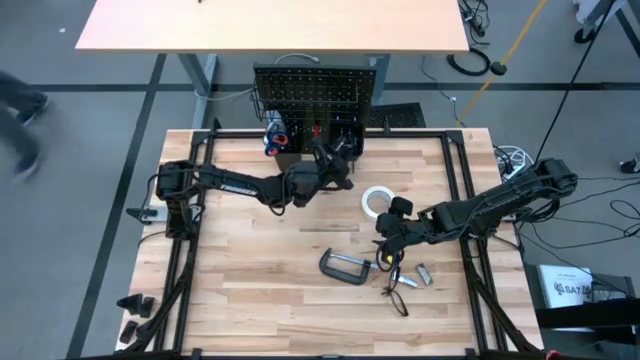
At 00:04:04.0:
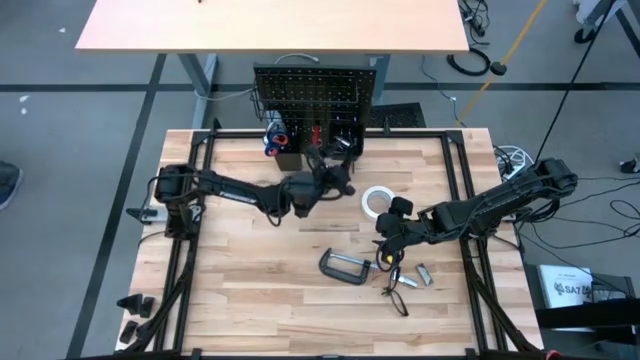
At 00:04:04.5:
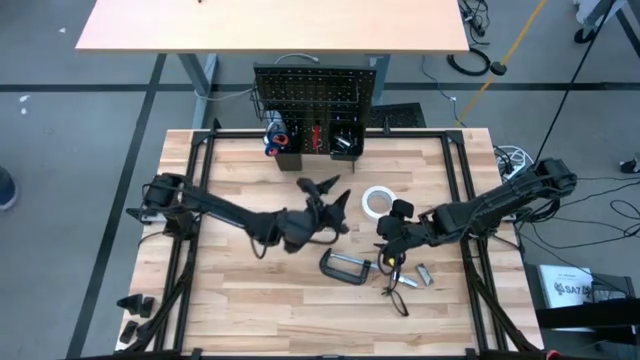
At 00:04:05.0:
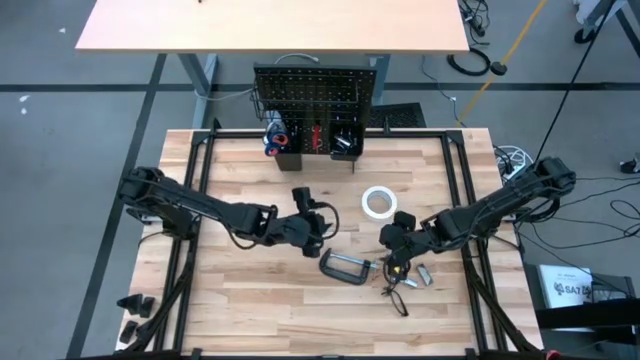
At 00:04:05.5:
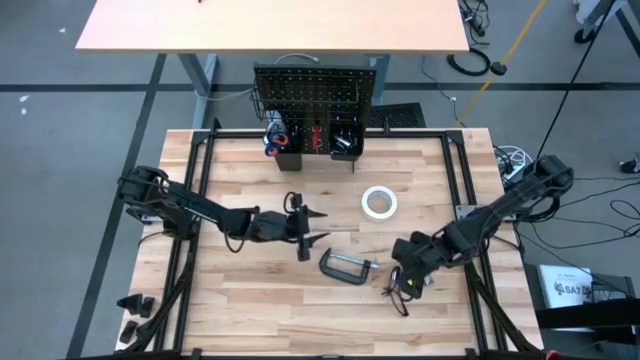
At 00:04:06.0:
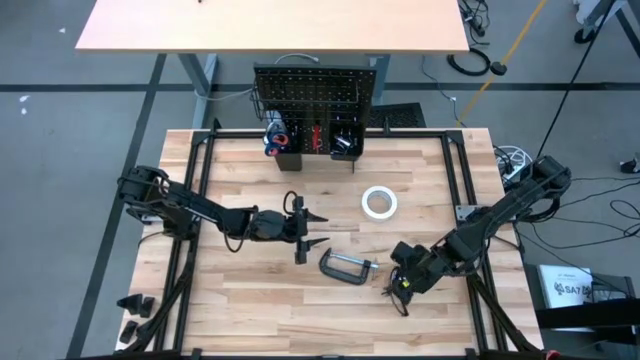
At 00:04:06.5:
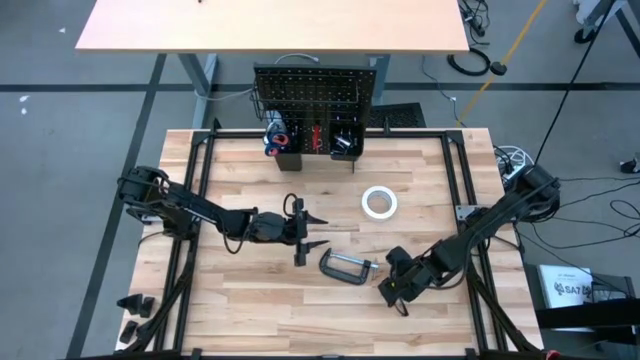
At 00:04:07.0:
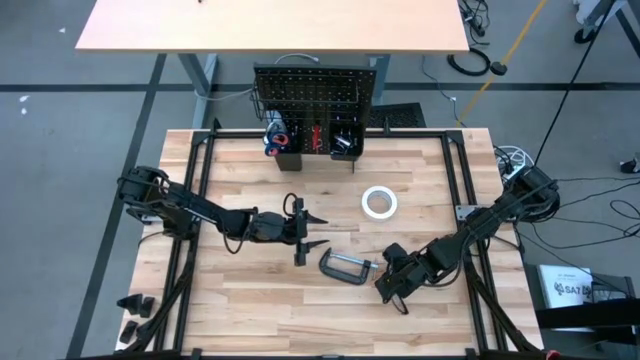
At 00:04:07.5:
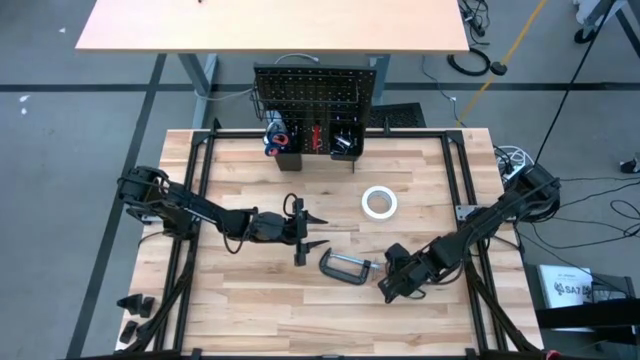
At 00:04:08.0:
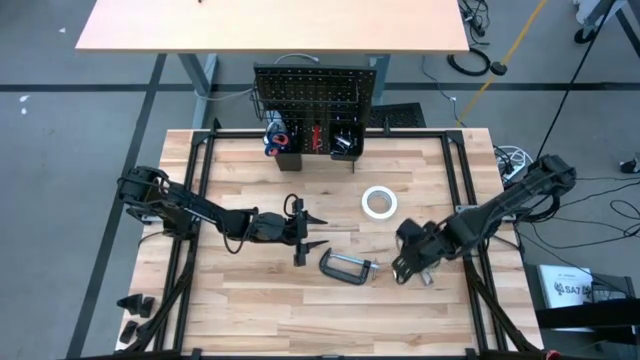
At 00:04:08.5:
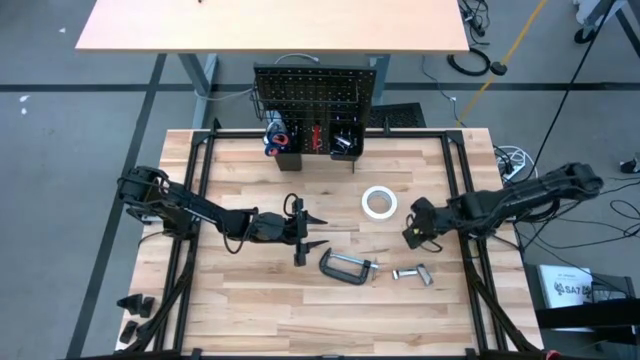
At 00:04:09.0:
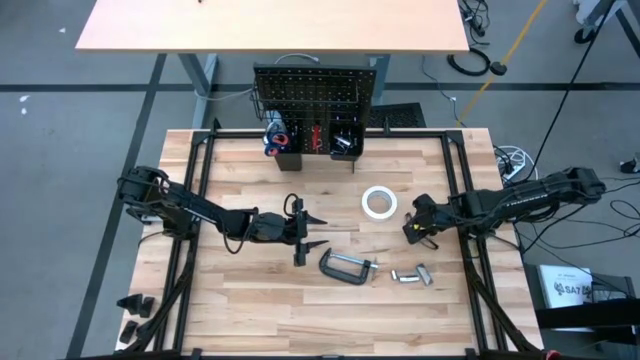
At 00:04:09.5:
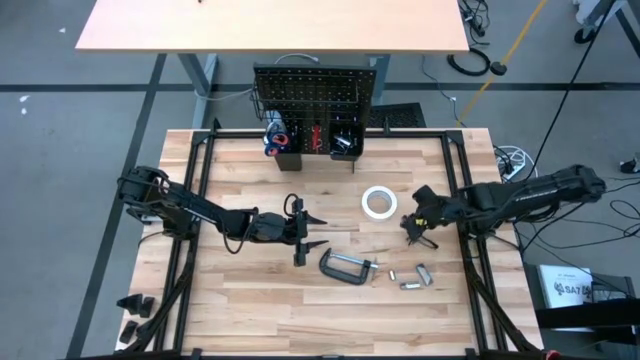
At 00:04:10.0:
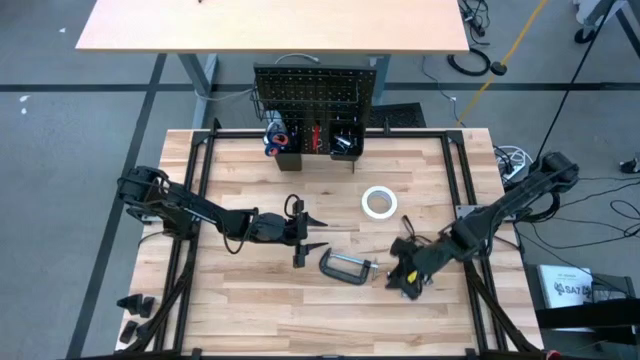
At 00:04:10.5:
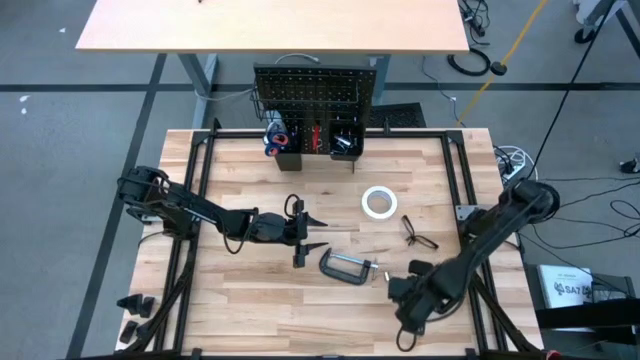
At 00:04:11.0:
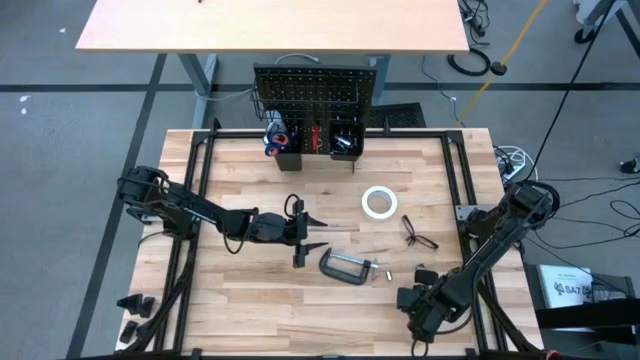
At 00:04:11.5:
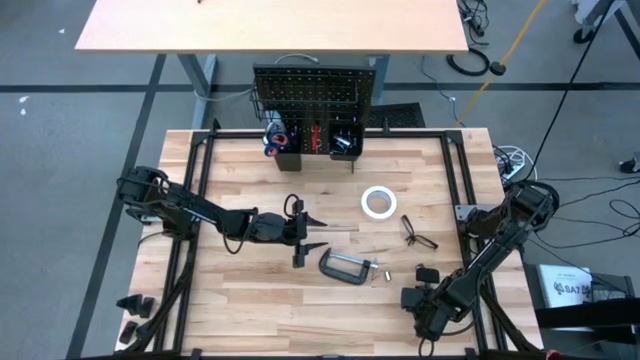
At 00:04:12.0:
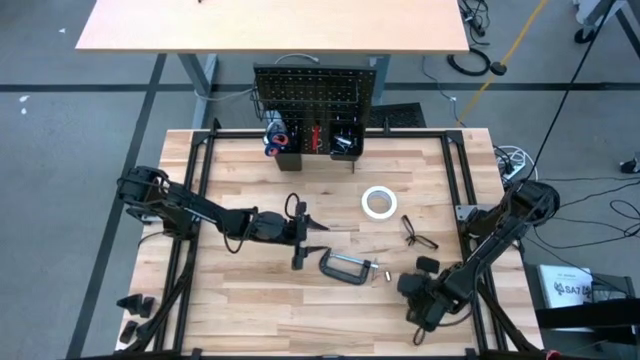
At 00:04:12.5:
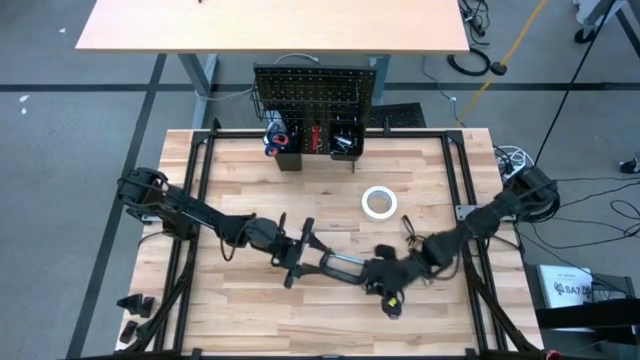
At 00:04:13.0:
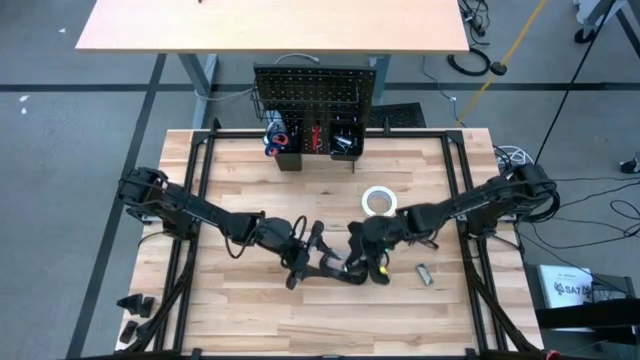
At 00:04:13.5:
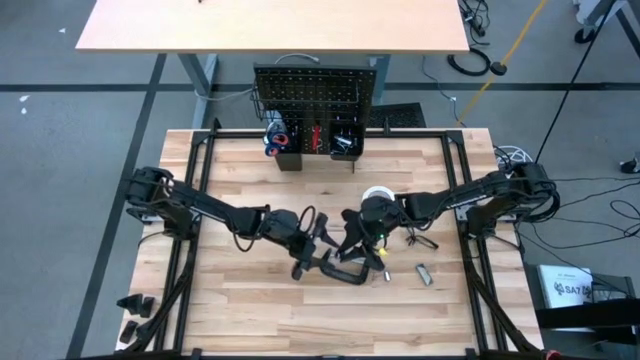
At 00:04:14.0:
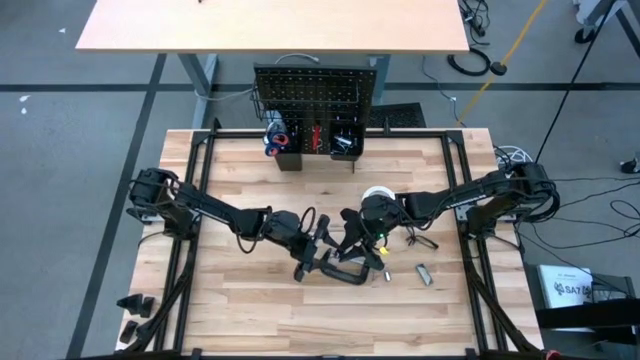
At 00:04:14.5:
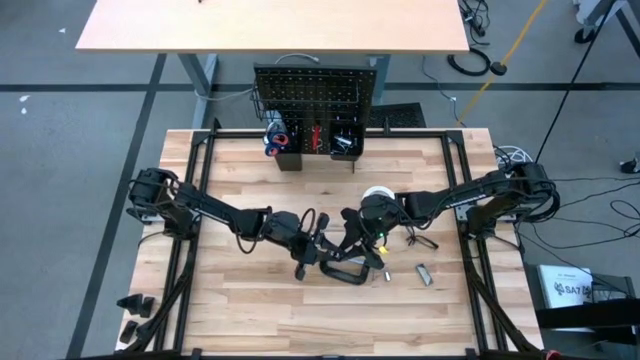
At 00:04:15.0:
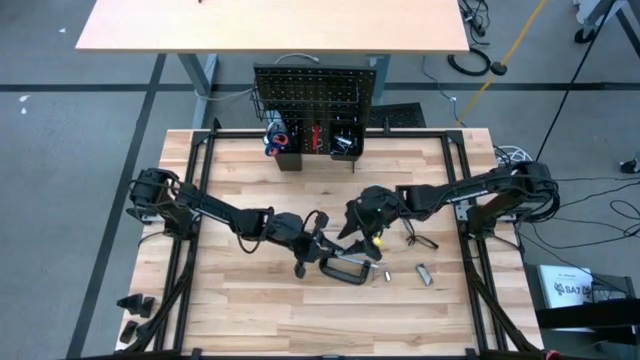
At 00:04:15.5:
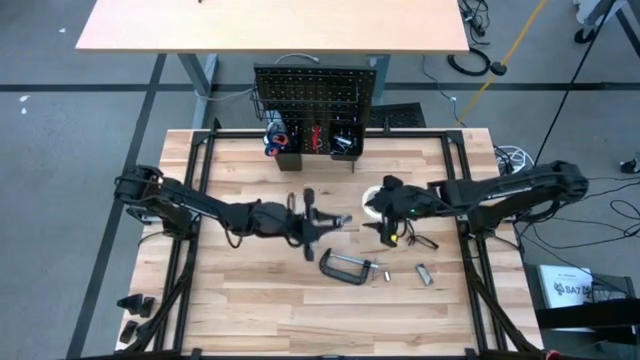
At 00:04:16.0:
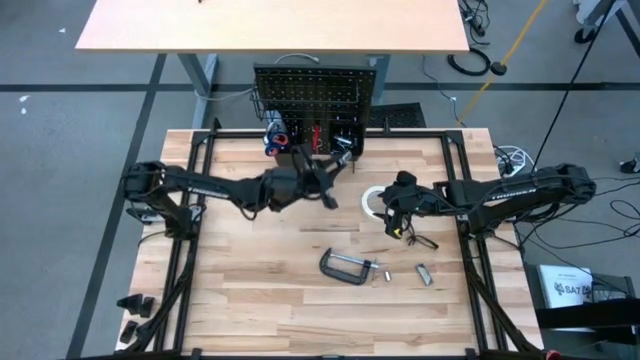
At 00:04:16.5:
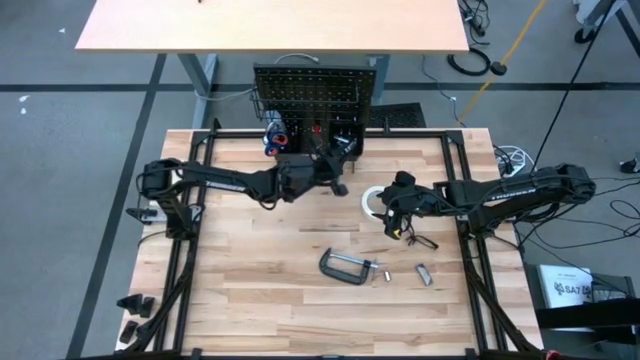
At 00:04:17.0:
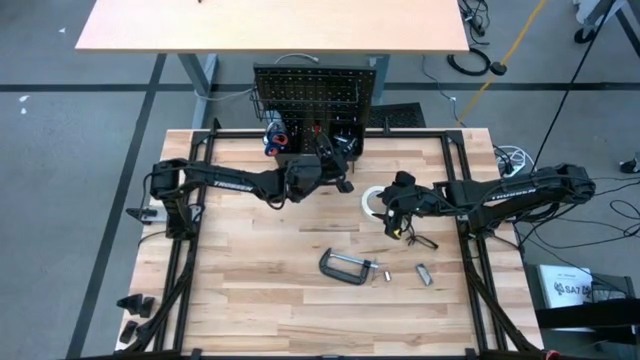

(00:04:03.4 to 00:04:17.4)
Task: Hang tools onto peg board
Put the socket on the right lower deck of the pegboard

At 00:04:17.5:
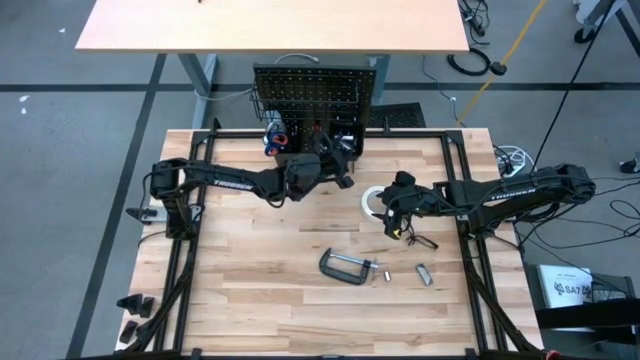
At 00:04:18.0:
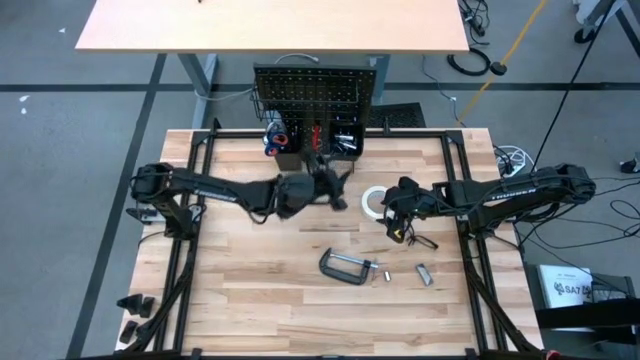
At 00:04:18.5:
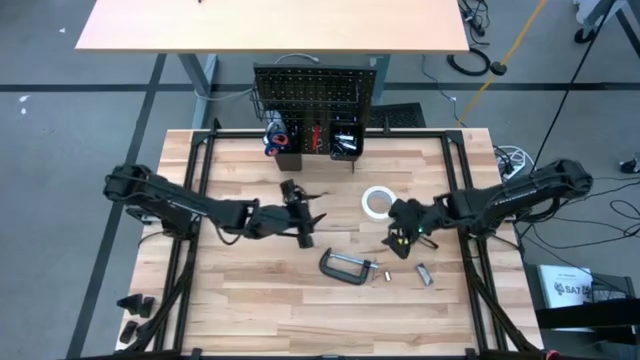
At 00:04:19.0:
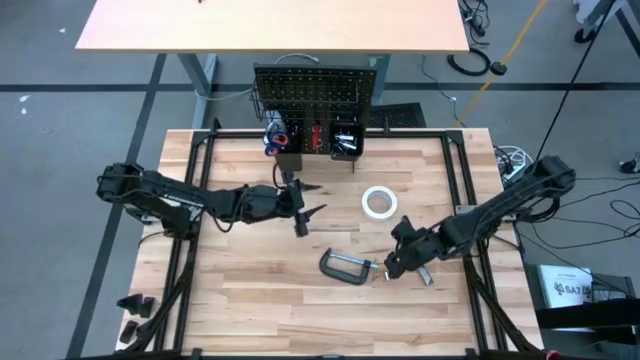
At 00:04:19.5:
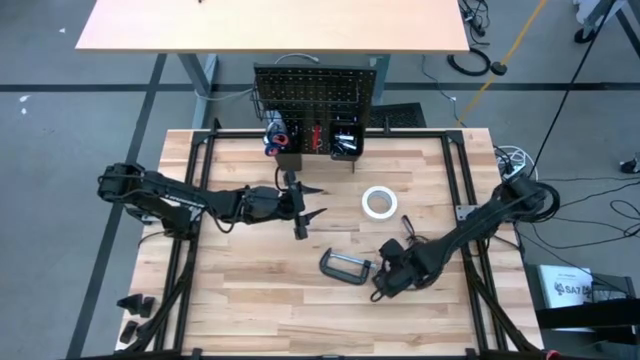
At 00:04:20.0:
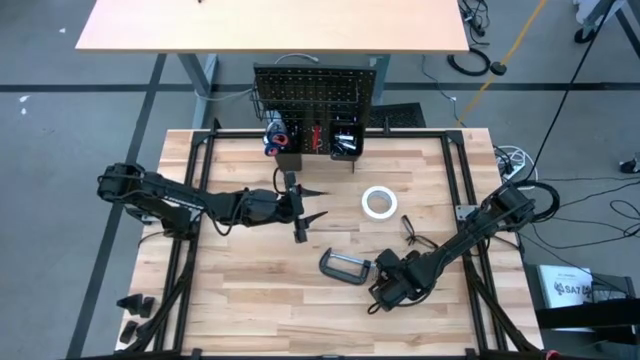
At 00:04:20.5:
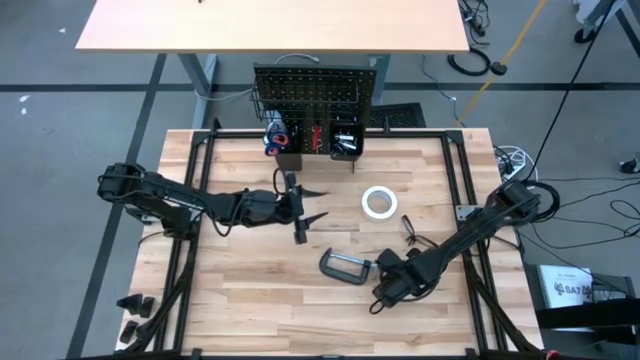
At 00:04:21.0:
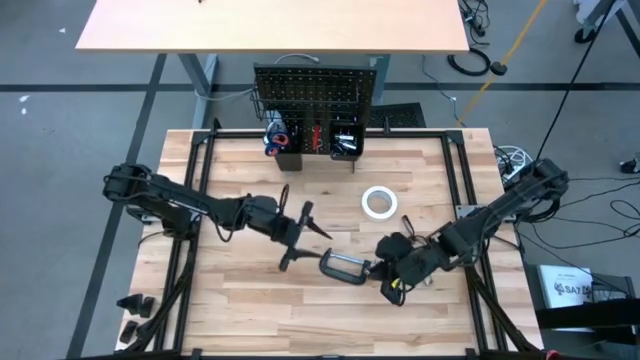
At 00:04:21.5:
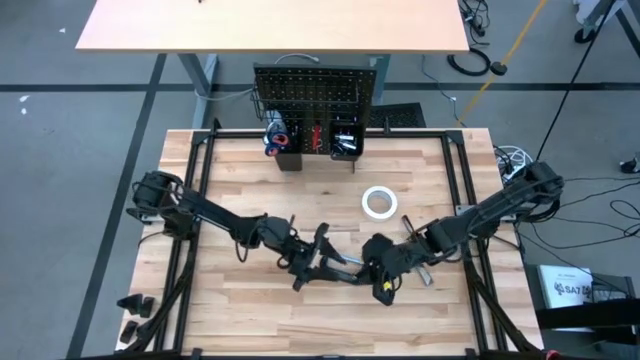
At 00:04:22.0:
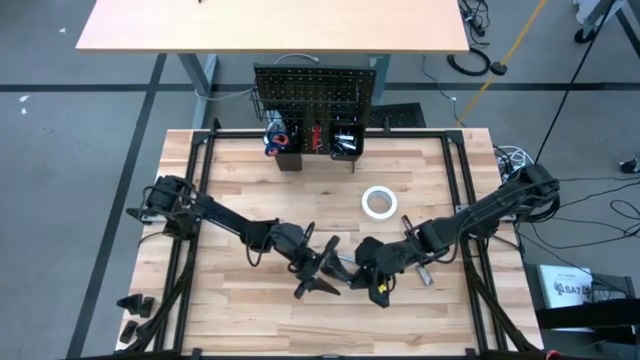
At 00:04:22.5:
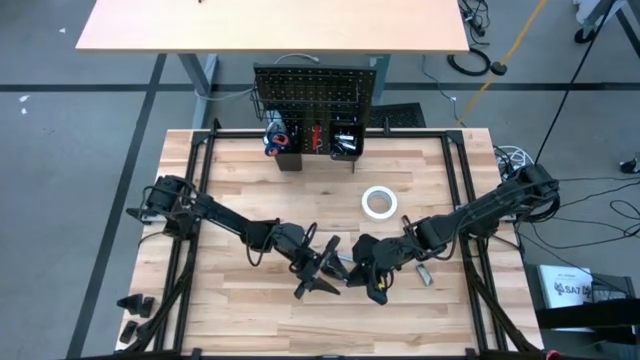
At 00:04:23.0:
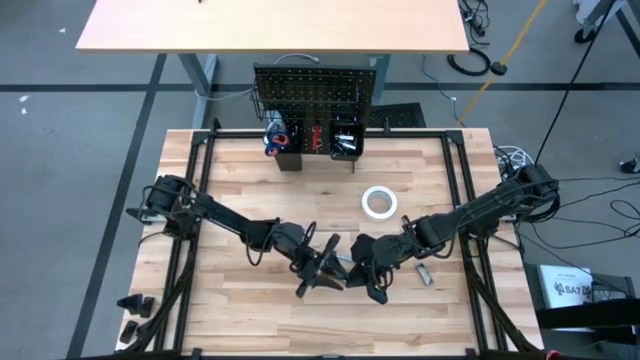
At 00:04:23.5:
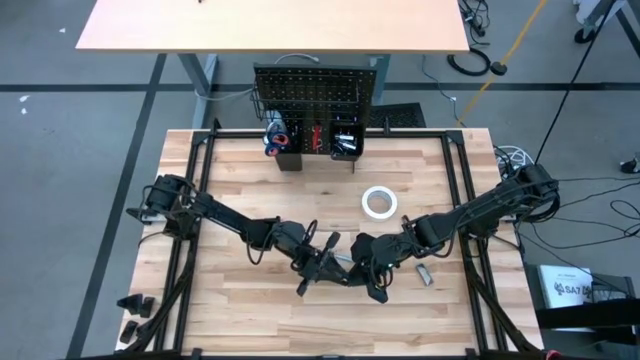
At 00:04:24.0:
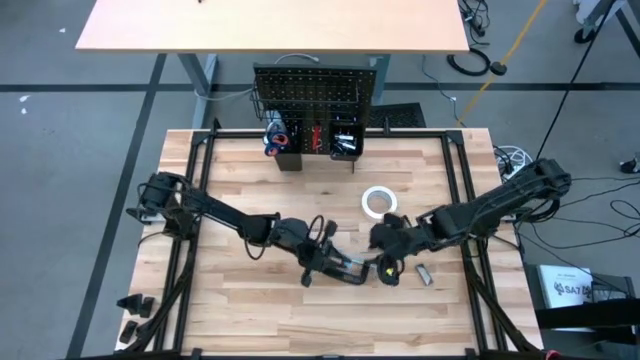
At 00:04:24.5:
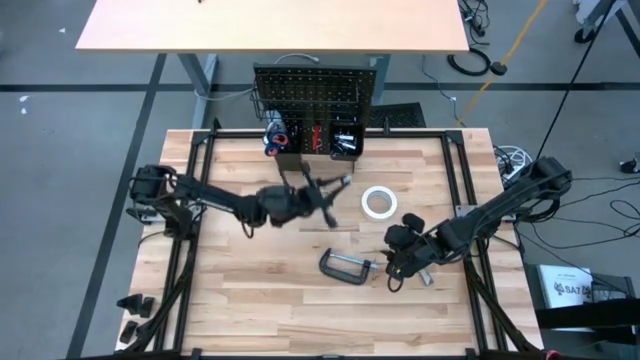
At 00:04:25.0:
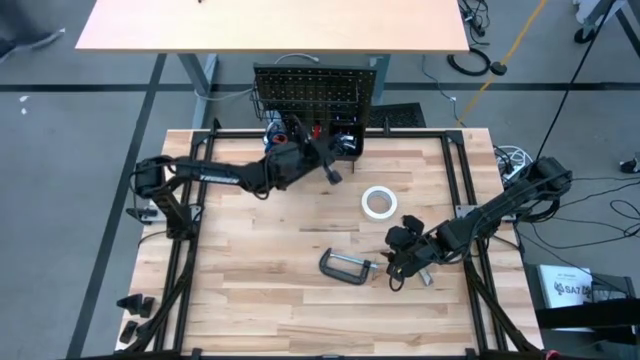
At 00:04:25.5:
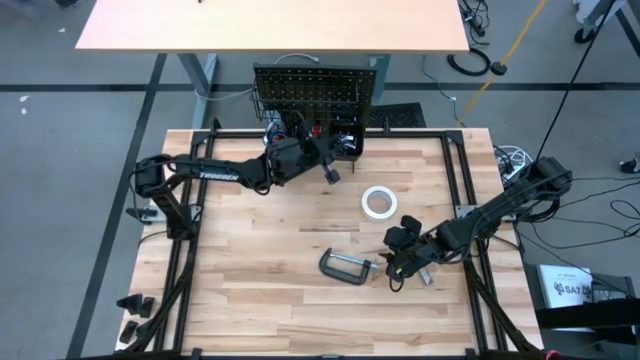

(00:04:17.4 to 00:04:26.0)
Put the socket on the right lower deck of the pegboard
